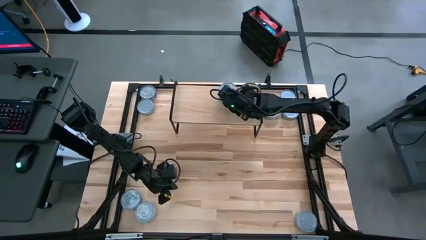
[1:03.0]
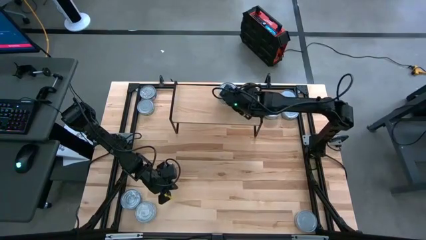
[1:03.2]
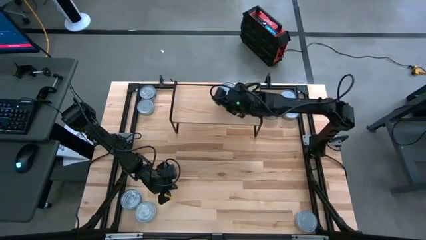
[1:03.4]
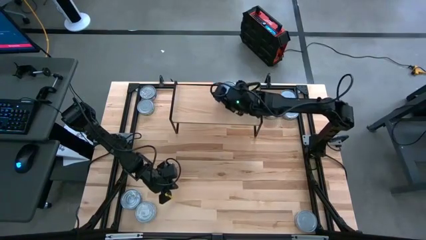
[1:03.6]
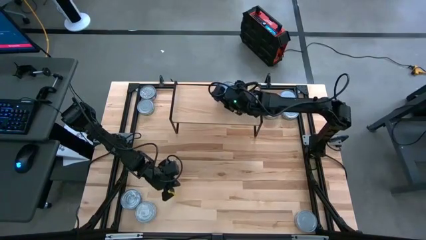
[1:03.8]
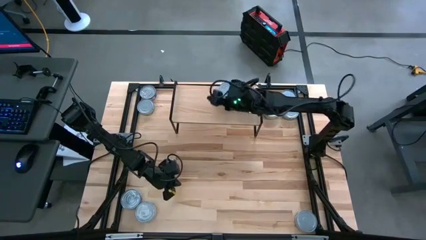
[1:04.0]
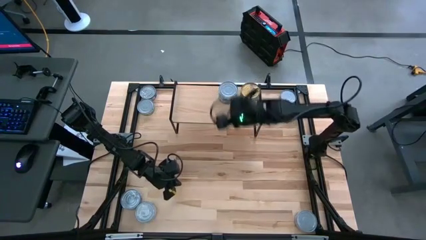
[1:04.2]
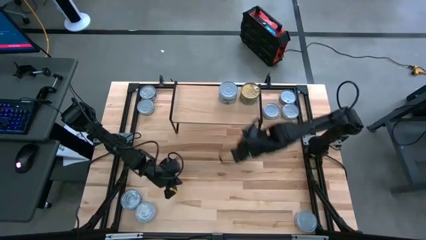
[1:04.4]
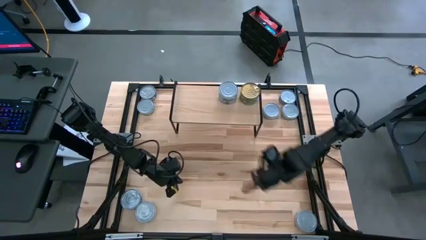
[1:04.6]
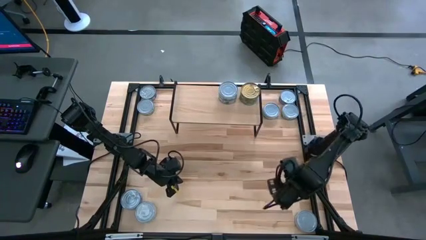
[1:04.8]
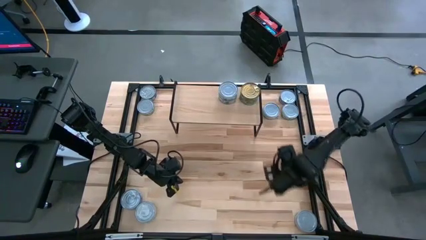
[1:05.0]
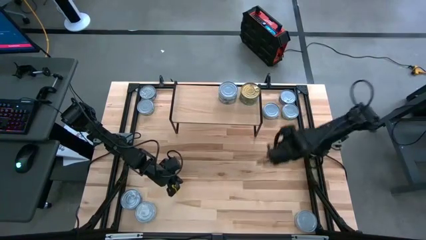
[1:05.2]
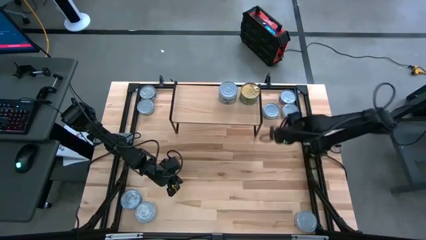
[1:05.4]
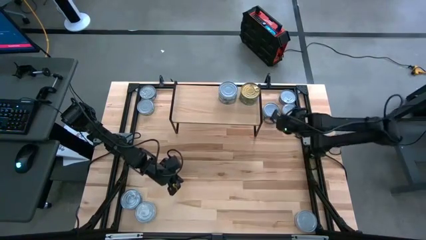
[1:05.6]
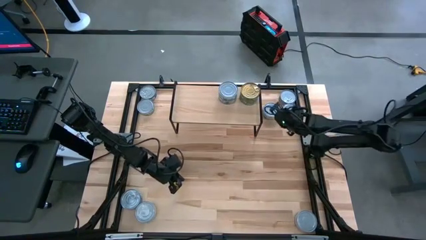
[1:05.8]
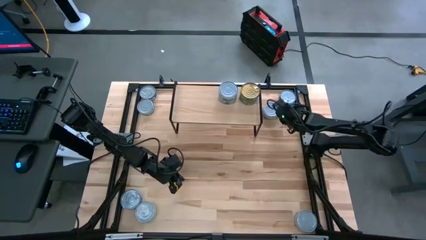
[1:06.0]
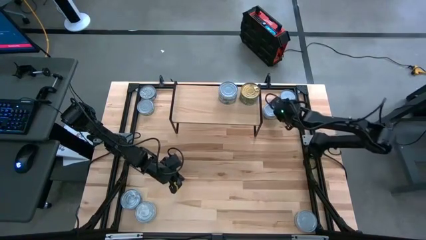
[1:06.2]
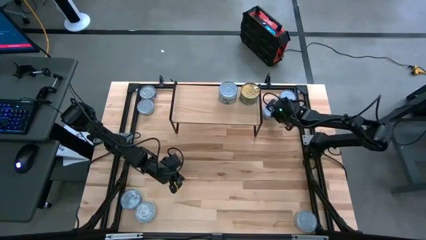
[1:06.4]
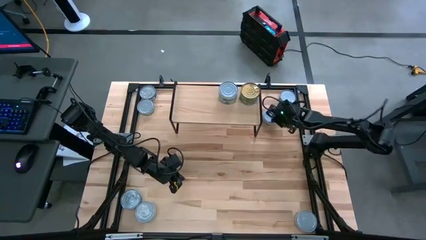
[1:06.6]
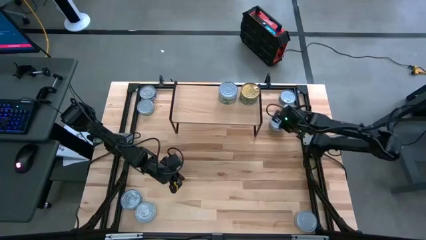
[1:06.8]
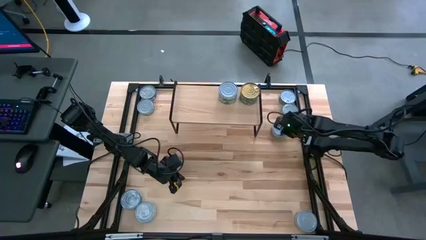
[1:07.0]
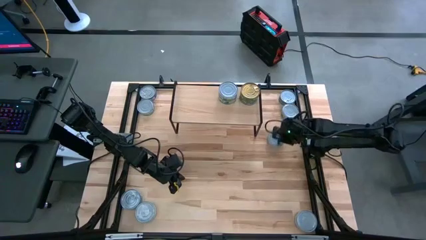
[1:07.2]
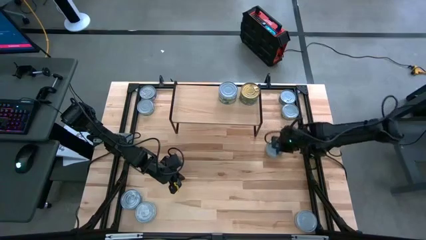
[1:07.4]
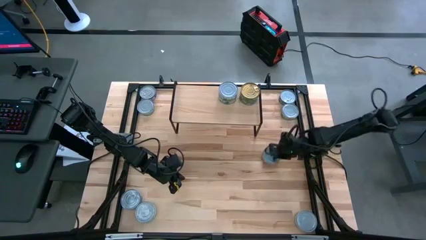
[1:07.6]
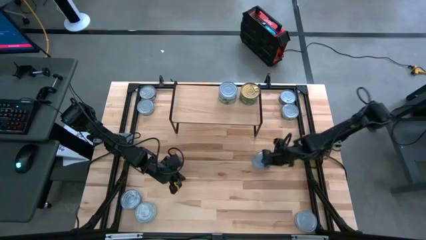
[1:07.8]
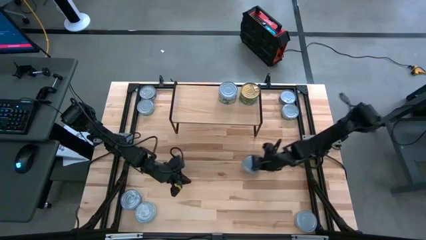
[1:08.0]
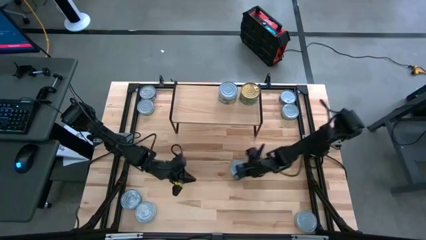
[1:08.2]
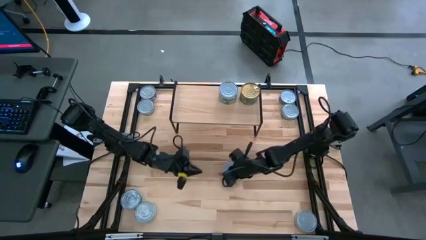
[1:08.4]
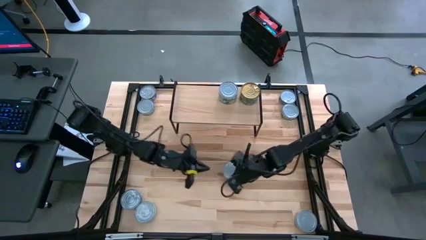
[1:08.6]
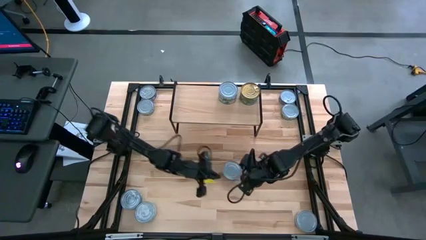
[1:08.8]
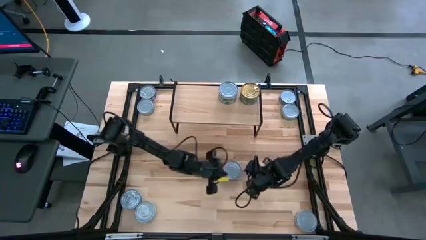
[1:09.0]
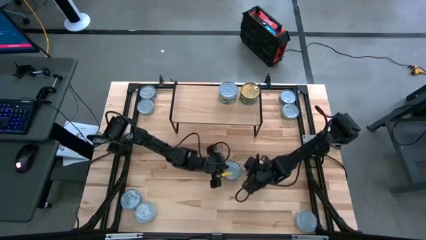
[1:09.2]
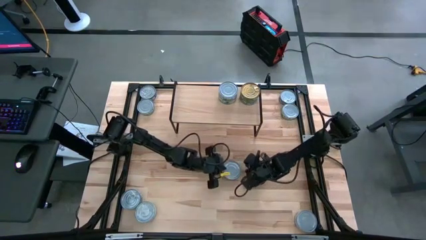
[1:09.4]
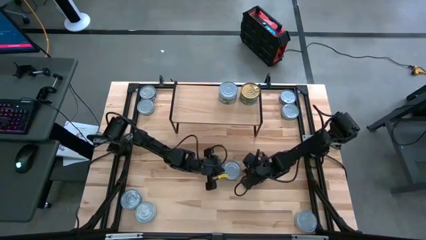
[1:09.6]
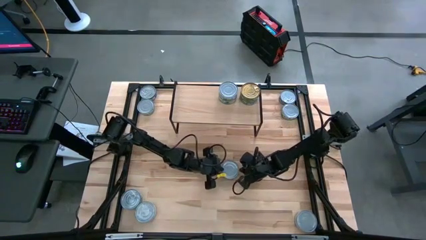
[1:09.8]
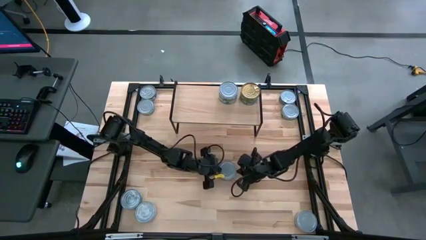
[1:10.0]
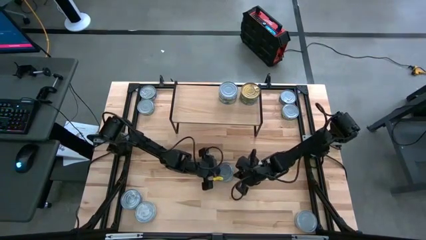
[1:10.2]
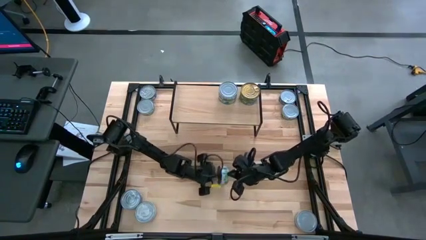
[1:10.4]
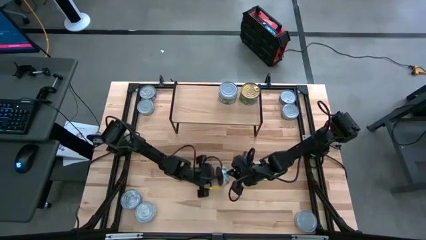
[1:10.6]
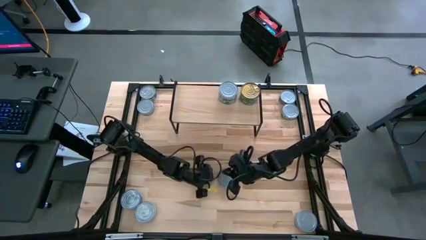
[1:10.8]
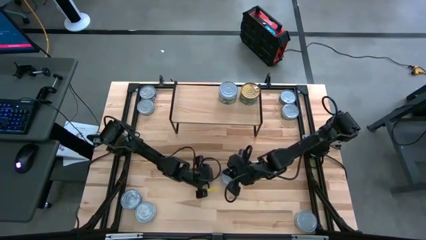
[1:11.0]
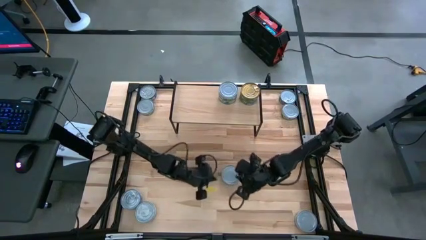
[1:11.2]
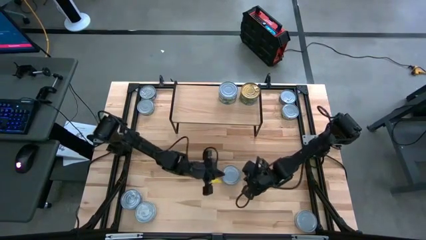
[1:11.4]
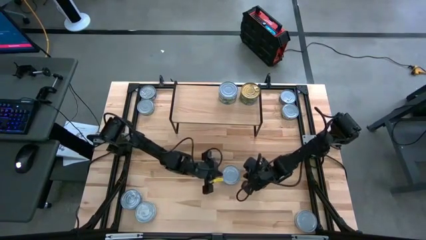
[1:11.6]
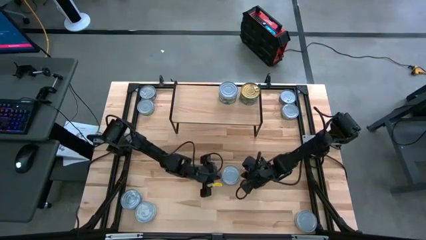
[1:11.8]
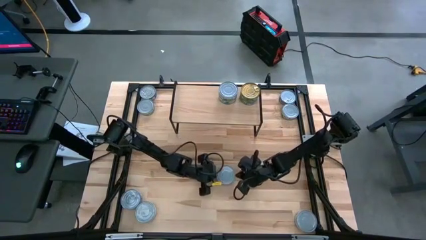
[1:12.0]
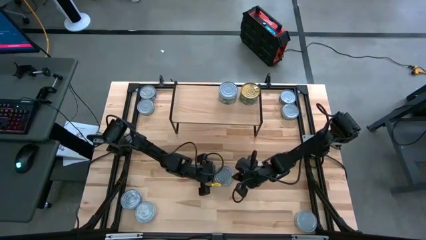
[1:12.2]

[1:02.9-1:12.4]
Task: Stack canned seafood by type on shelf
Put the light green tuna can on the shelf

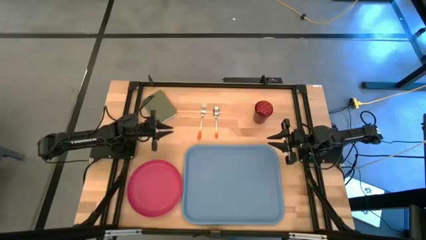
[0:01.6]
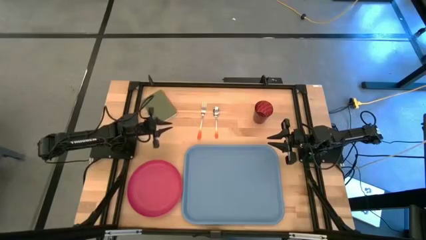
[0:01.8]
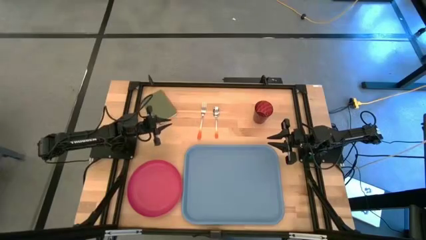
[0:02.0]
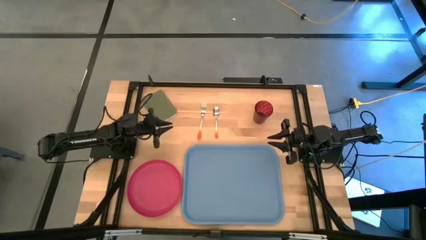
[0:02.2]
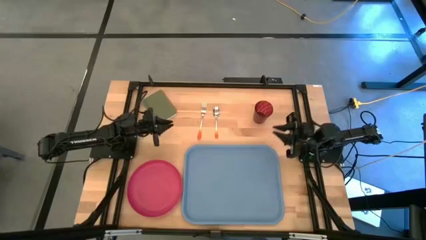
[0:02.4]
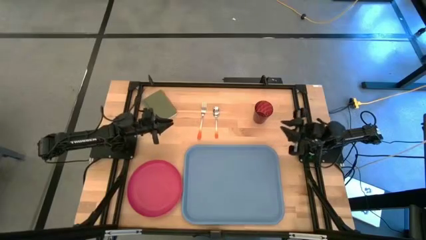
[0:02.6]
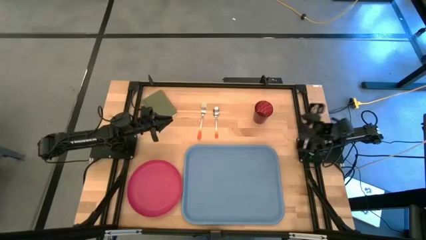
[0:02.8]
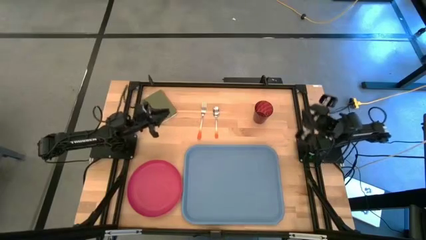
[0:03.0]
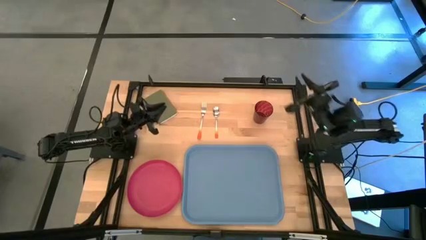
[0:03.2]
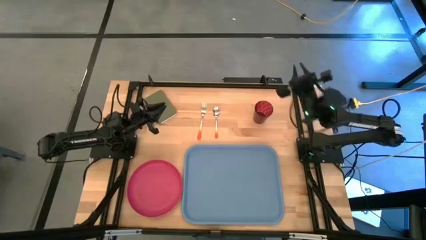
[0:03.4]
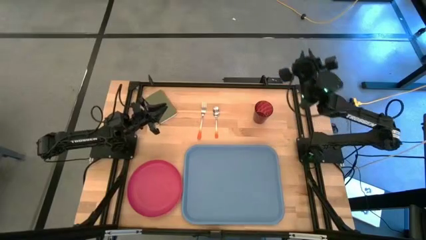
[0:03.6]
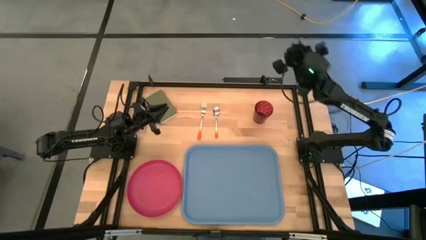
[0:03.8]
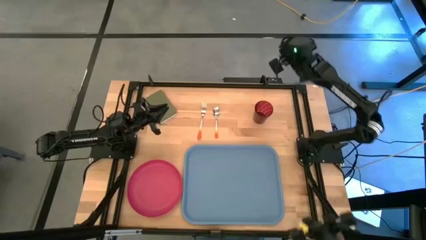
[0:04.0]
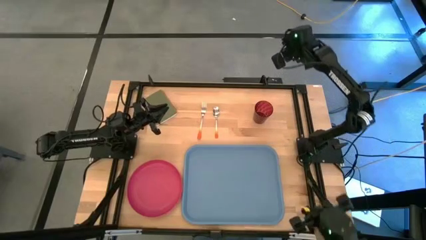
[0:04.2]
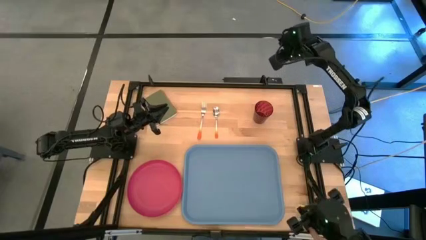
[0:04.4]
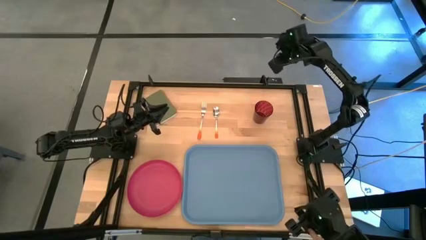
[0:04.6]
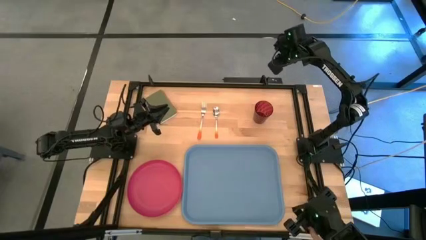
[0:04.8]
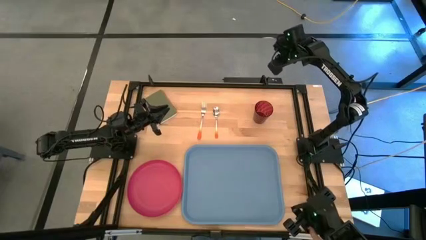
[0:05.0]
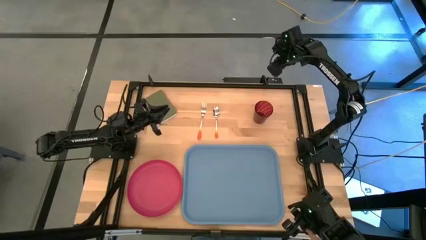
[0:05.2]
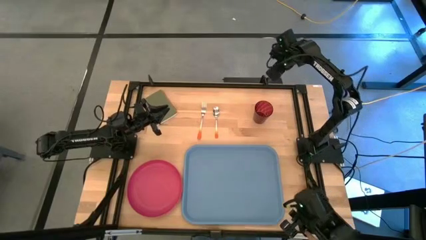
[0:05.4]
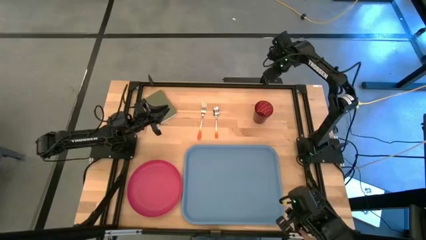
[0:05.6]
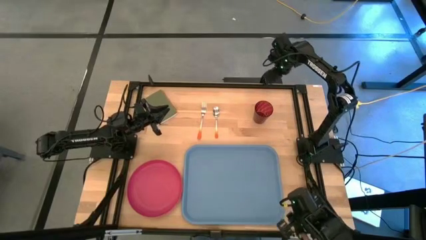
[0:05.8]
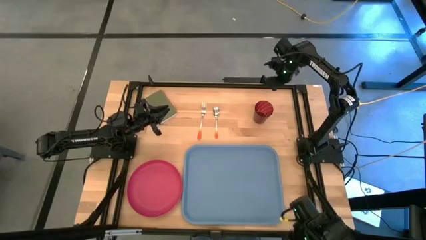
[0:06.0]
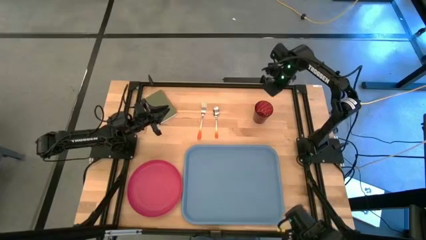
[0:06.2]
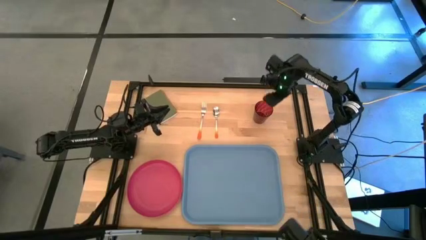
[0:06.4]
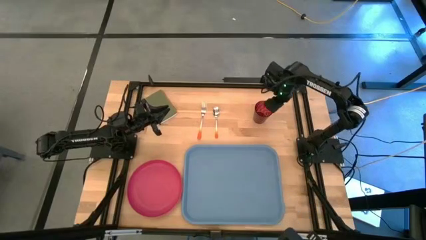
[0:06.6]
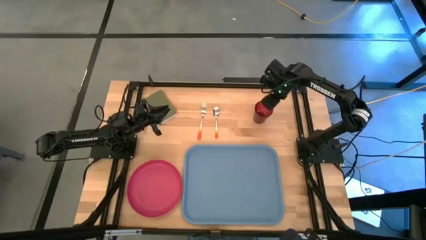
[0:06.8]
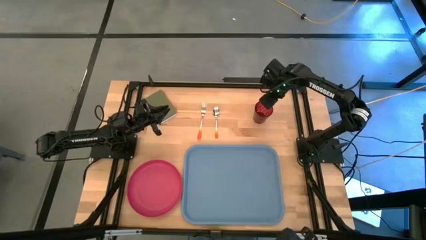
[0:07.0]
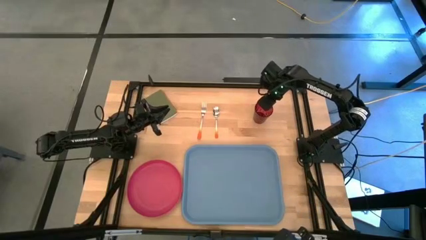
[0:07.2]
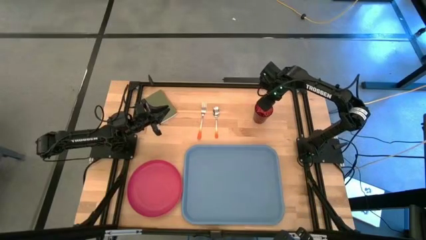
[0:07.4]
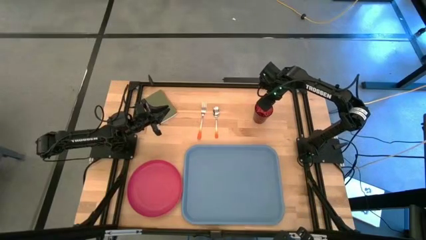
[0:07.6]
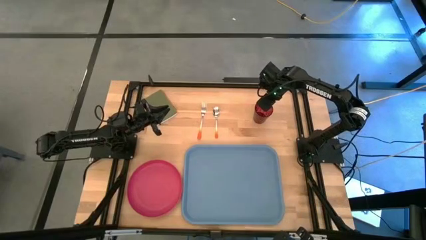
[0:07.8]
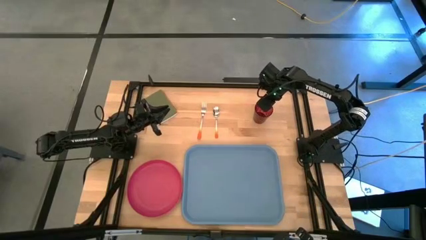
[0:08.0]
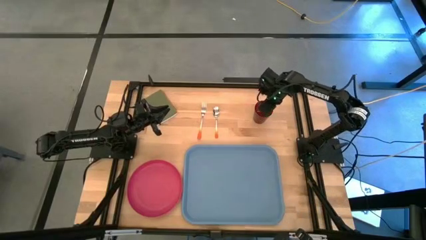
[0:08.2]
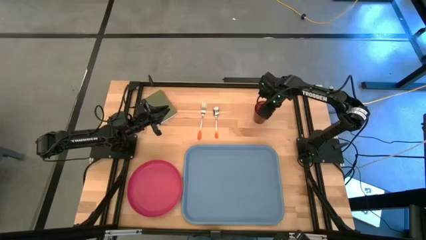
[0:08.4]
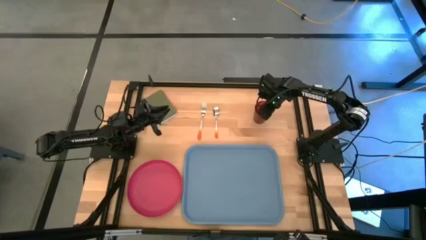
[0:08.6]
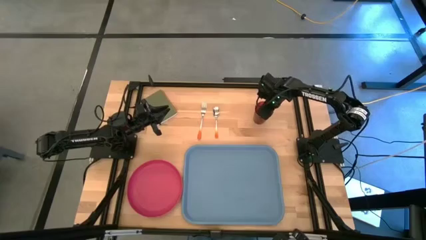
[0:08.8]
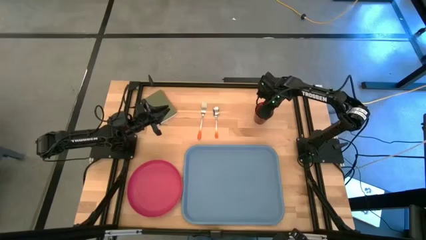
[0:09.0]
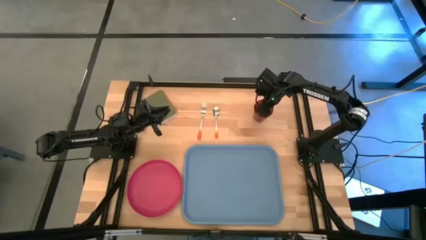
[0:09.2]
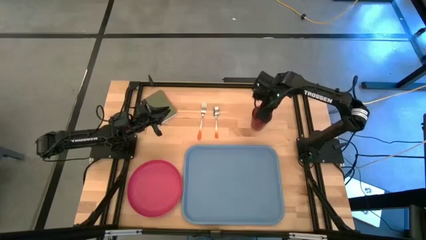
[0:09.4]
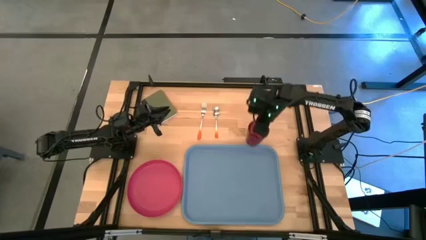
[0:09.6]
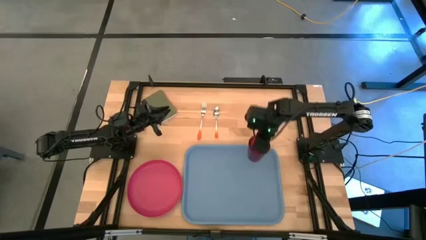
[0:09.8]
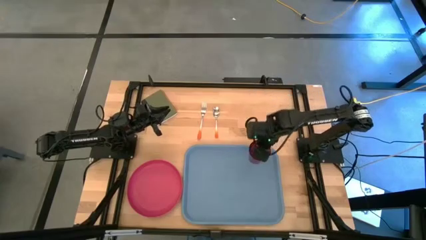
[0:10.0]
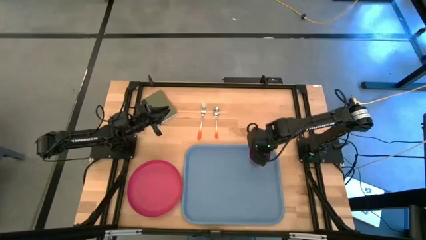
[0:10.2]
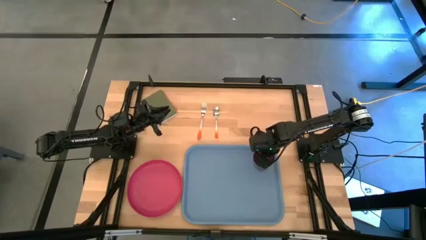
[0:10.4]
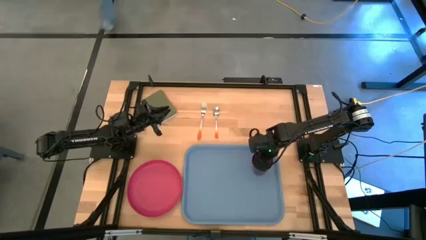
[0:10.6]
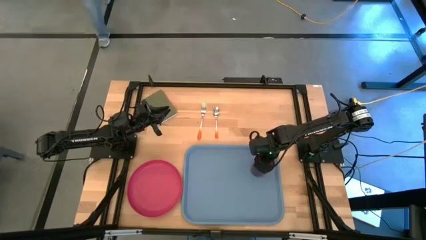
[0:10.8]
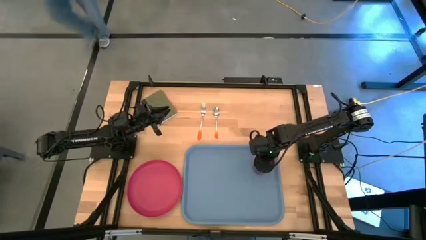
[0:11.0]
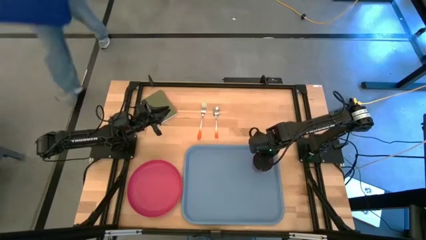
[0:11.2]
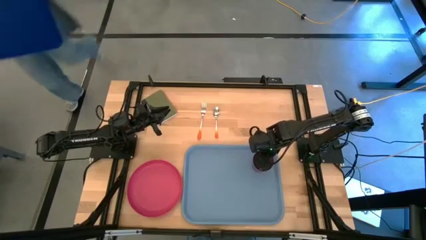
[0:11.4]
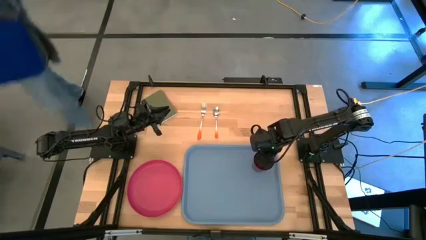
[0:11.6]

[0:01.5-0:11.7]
Task: Pick and place plate/cup/fork/spoon on tray
Put the red glass on the blue serving tray
